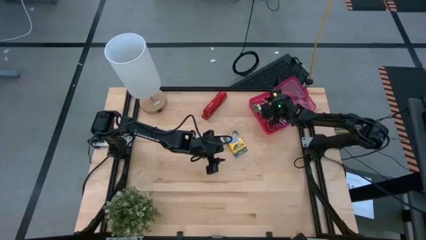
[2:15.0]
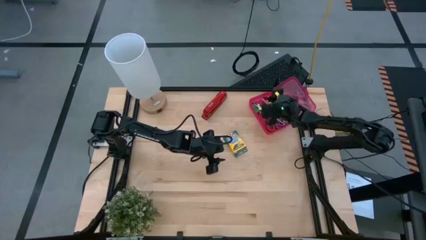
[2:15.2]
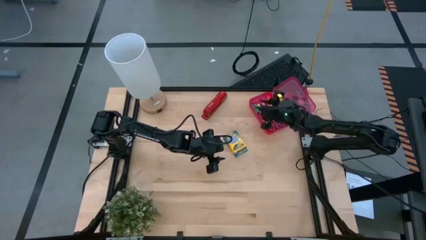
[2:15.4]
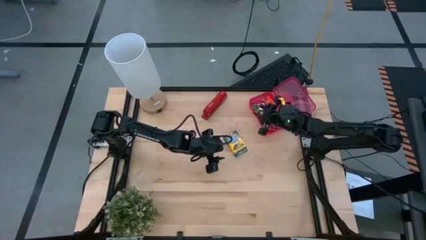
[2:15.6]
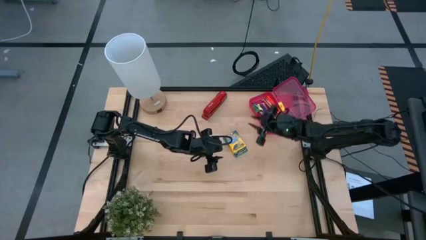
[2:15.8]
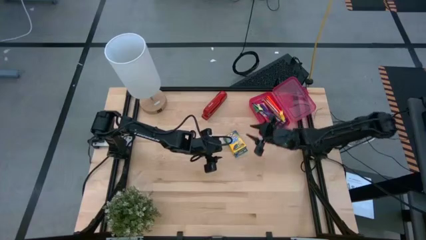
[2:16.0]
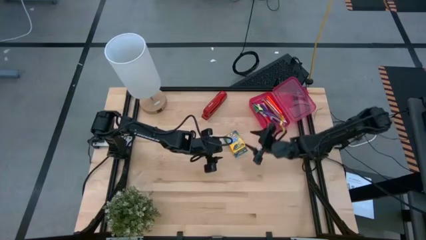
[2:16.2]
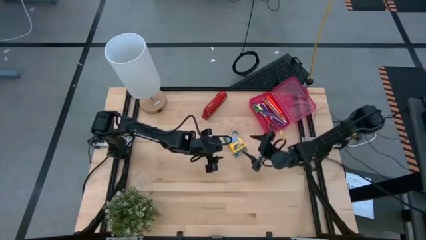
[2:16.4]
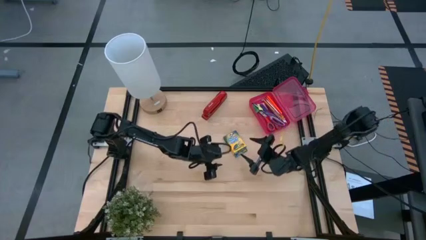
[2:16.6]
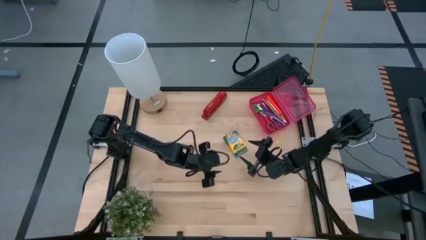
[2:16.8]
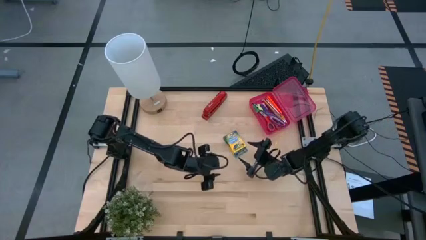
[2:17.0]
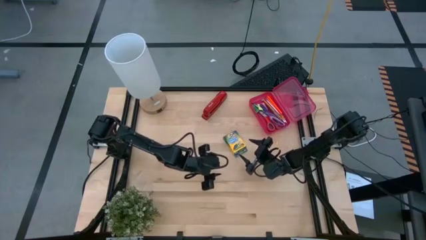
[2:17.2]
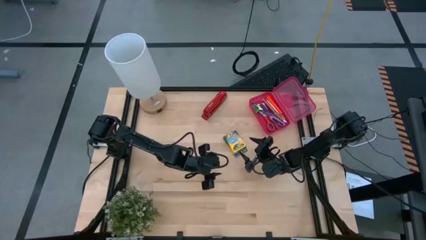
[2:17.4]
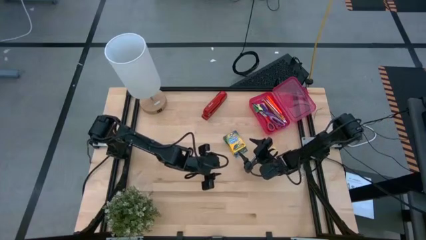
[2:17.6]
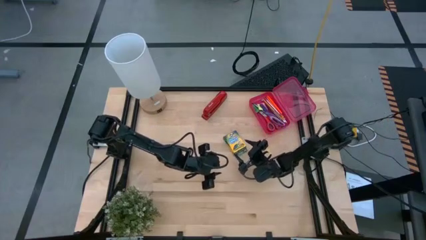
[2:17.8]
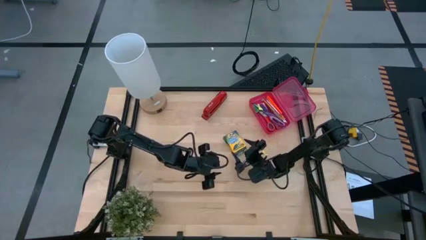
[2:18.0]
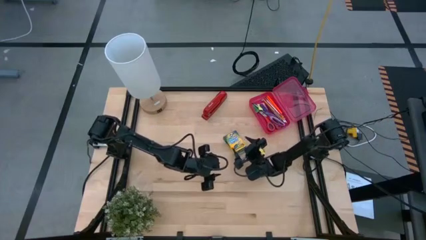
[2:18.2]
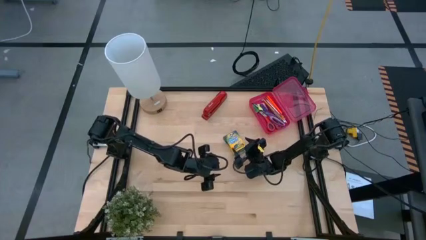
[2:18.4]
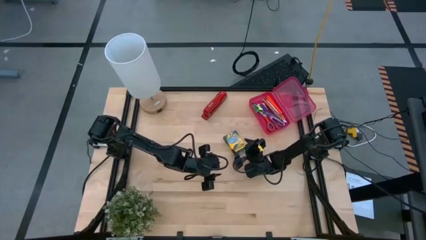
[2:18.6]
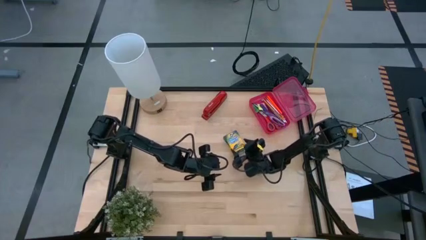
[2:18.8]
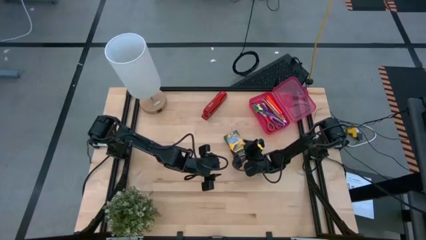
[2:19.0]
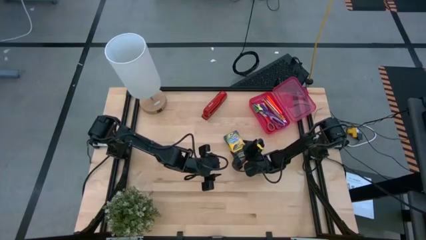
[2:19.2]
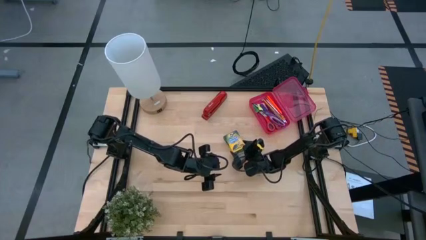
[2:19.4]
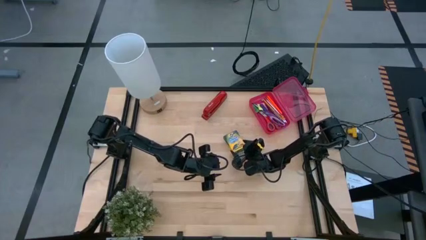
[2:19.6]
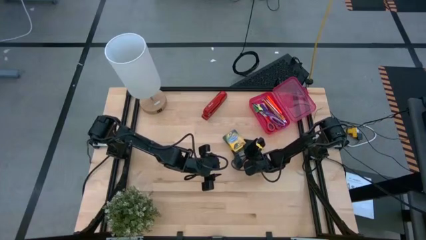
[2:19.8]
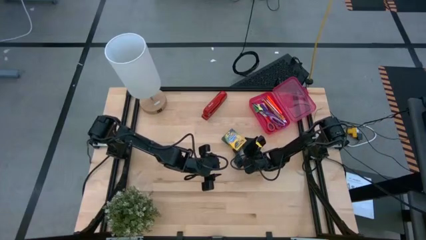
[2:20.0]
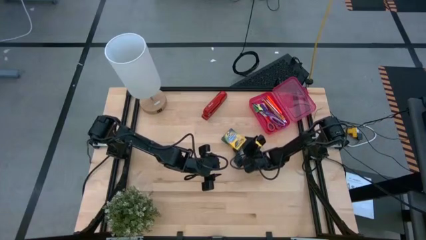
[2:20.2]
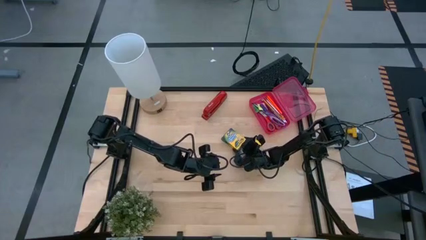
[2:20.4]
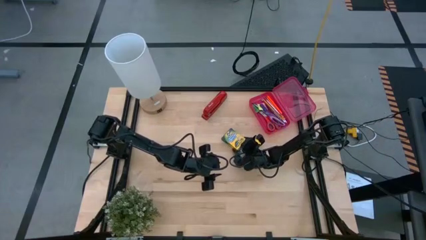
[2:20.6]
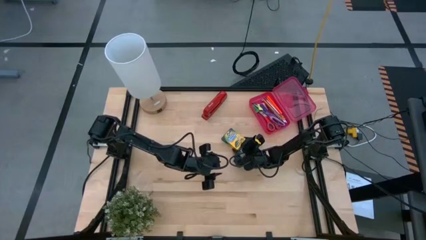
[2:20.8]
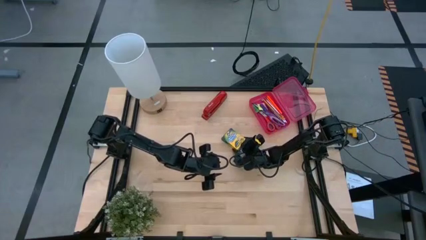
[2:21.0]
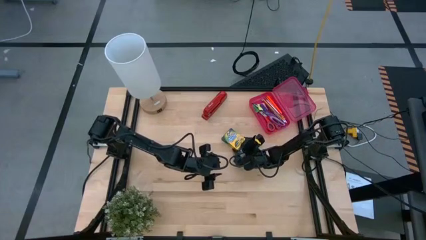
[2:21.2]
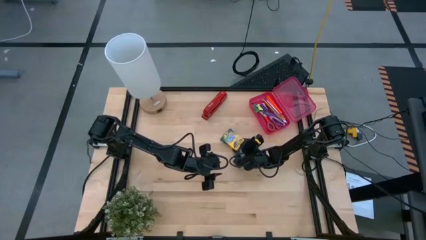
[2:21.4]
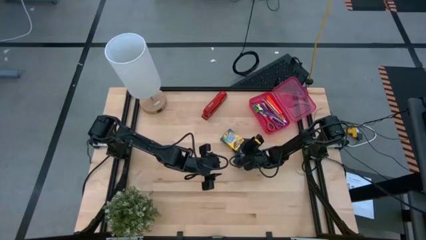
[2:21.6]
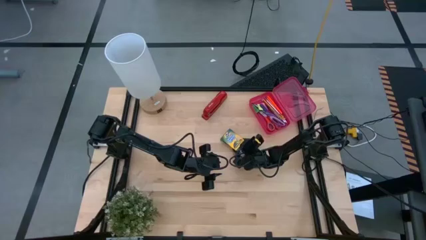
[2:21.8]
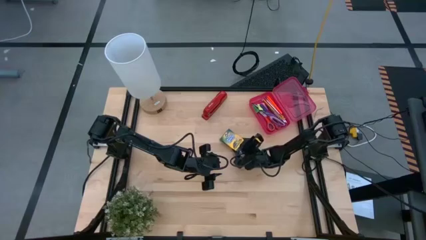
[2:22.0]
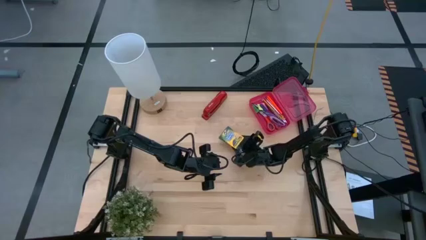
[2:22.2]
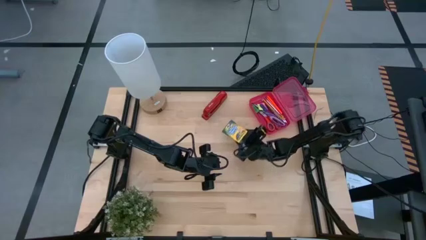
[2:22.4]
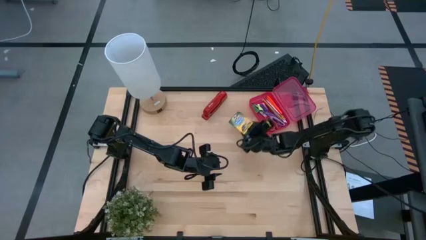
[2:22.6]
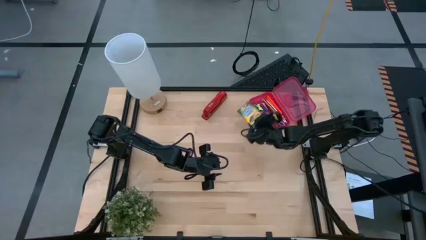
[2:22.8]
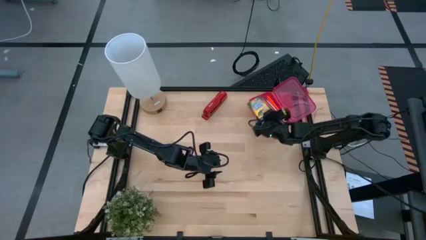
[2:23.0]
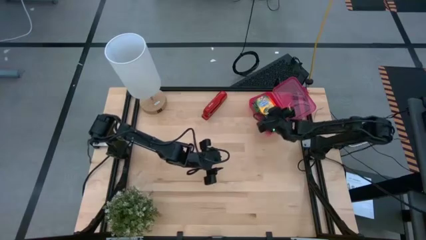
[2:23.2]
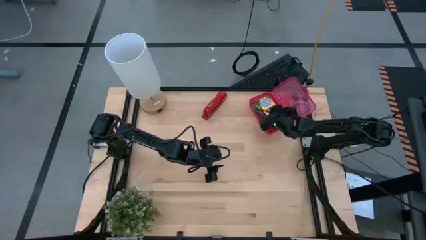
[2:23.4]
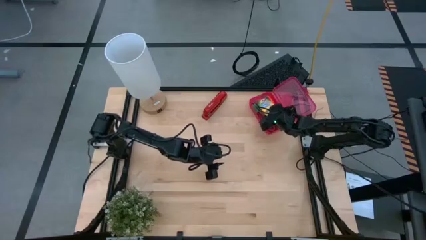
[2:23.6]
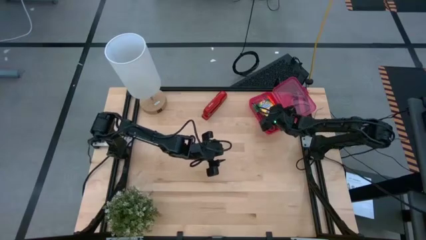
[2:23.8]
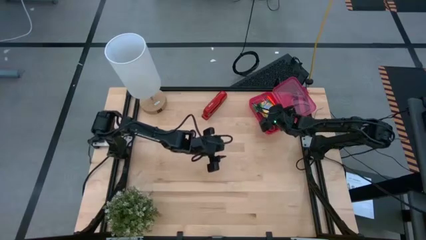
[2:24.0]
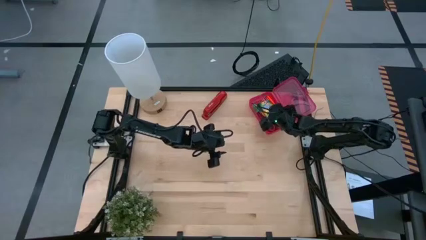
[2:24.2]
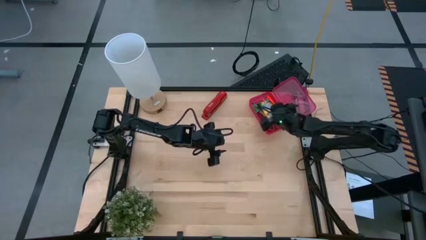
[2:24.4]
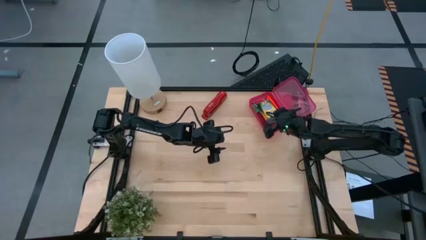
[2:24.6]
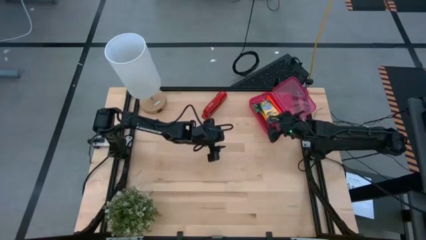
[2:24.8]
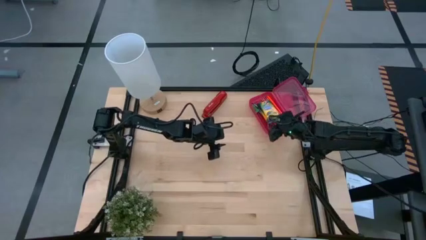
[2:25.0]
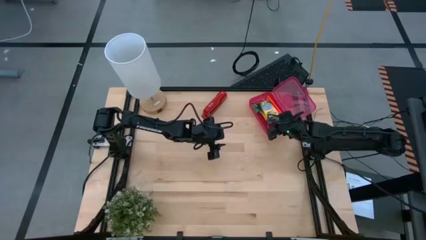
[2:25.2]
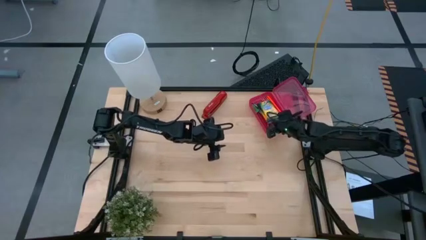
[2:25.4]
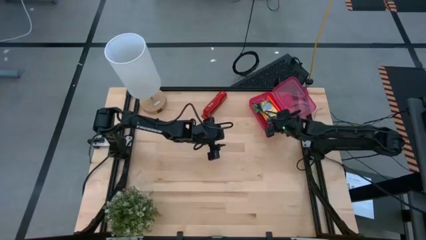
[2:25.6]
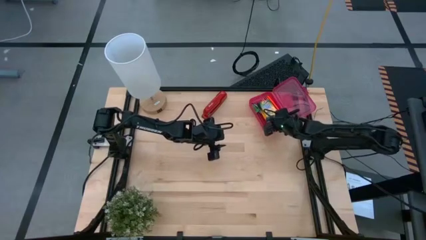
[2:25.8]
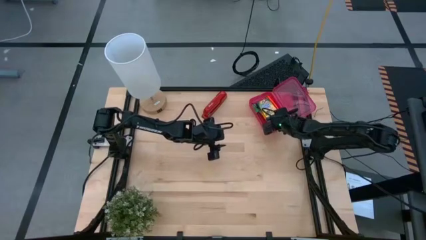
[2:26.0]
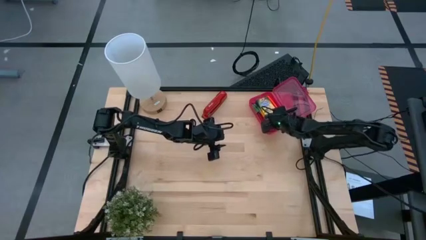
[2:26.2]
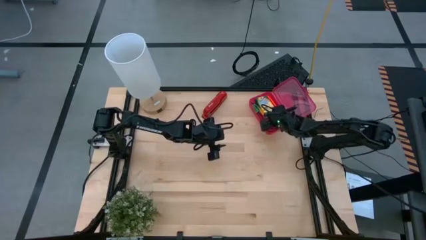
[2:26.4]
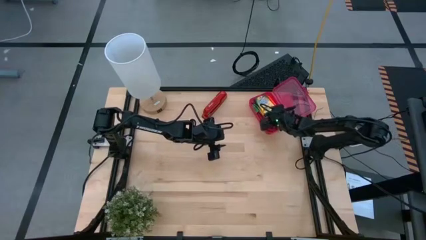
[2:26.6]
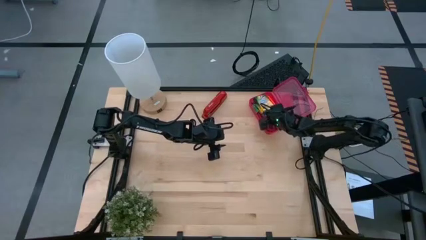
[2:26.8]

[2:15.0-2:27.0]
Task: Pack school essentials
Put the crayon box into the pink supply box

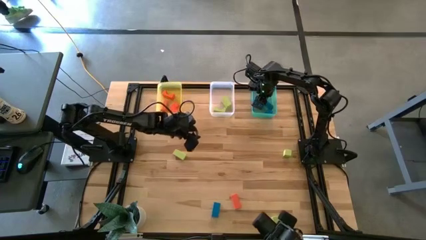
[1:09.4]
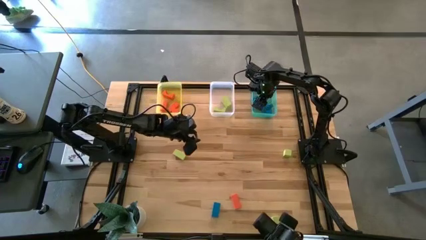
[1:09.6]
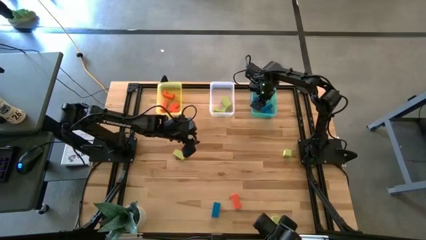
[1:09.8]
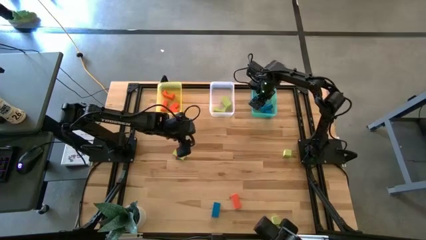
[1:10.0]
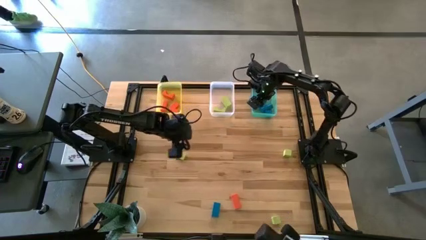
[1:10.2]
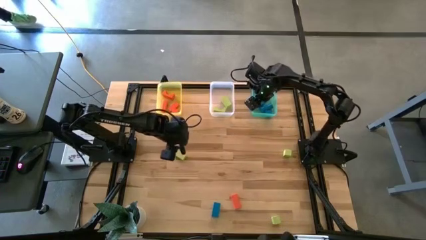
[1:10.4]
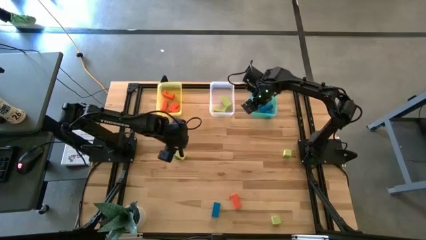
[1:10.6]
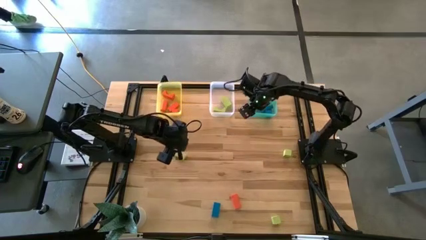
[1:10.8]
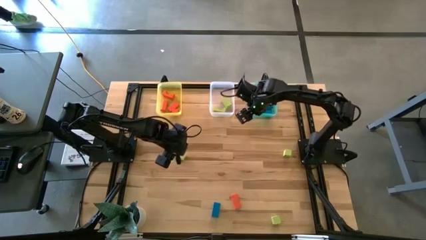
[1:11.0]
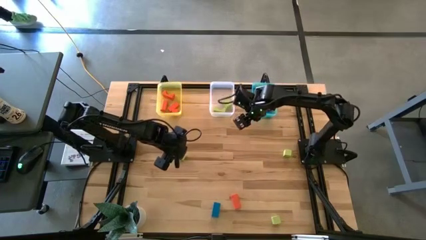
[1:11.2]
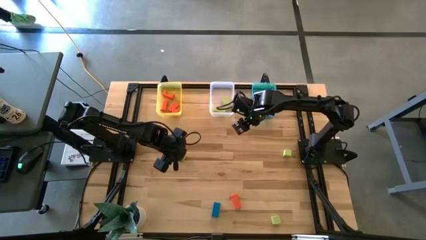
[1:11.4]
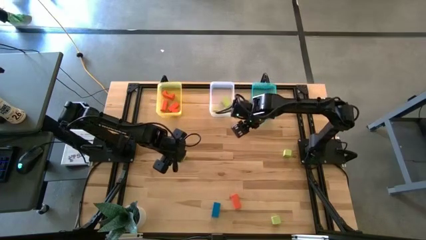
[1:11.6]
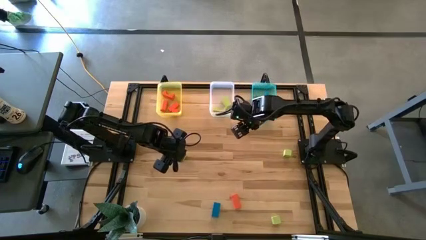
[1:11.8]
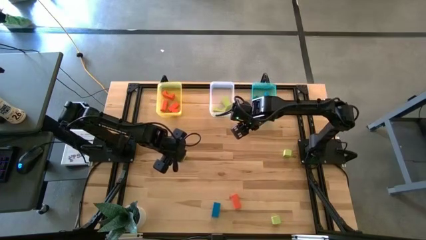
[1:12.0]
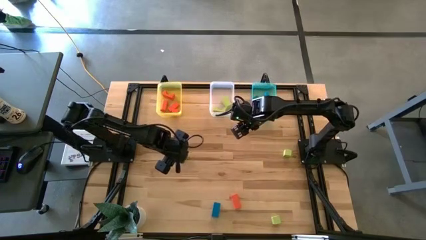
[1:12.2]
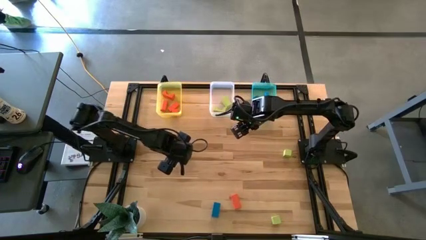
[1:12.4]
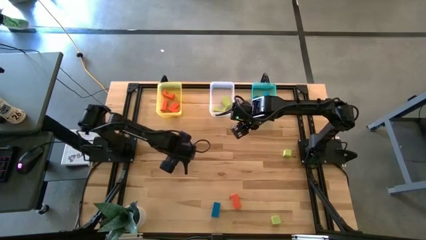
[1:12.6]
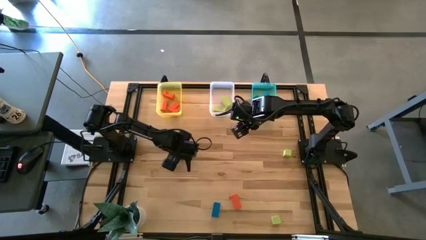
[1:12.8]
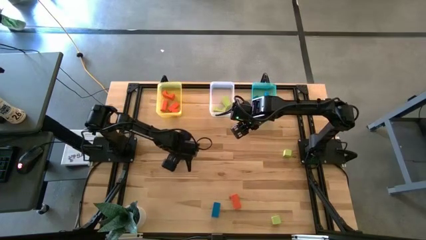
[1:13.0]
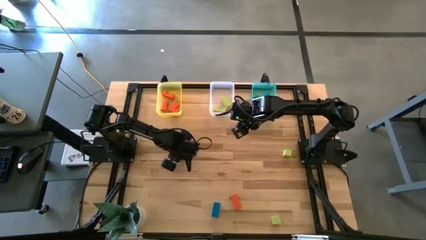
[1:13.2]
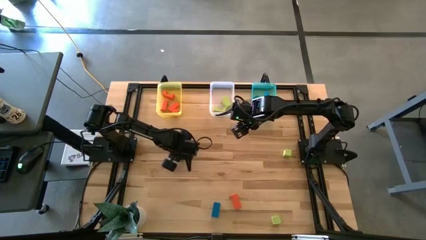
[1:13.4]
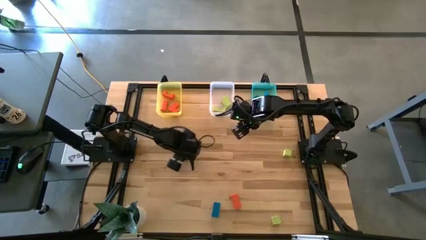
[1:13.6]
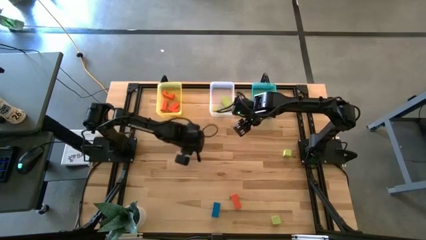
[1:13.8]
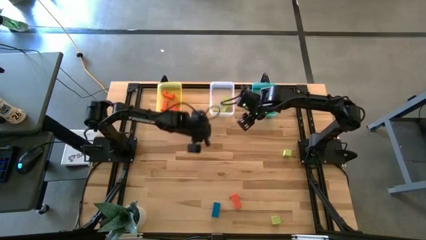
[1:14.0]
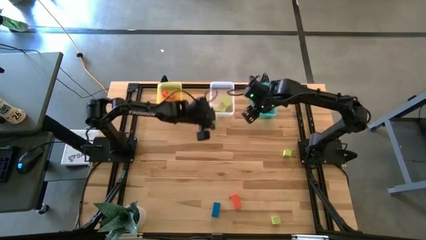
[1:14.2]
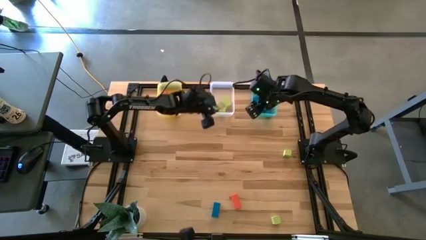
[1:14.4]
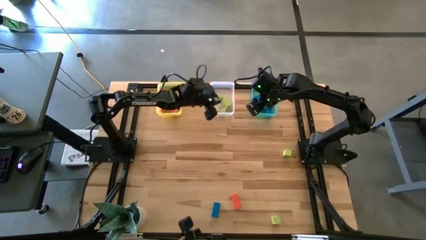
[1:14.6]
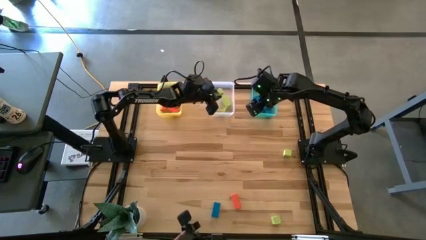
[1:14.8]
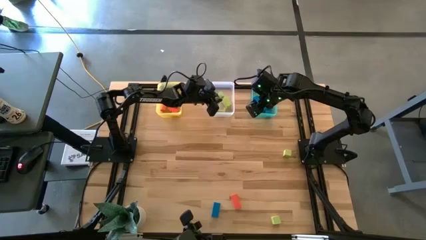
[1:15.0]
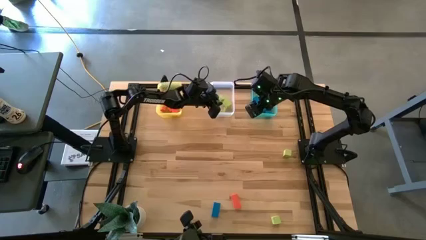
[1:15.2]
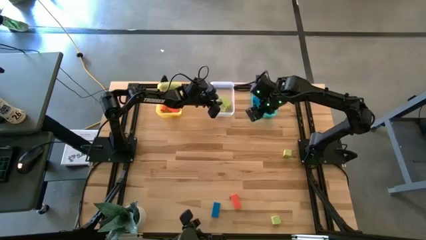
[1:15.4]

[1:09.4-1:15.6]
Task: Sort & place blocks by color
Put the green block into the transparent bin
